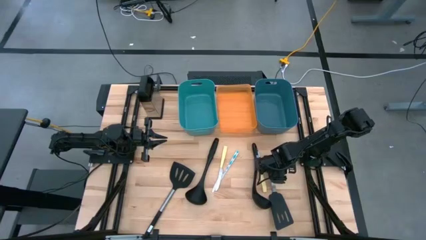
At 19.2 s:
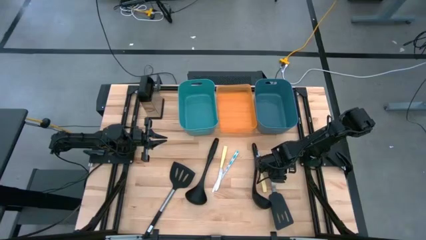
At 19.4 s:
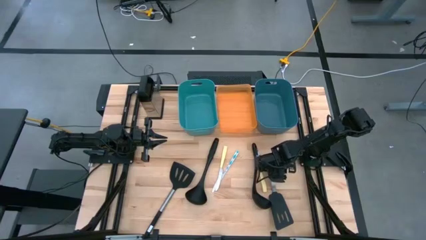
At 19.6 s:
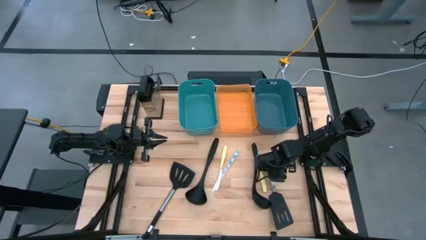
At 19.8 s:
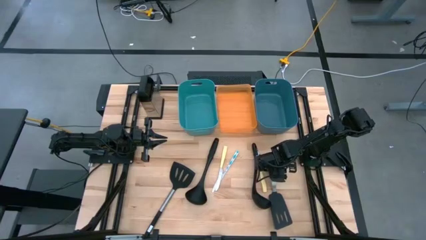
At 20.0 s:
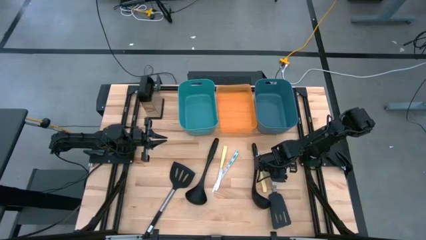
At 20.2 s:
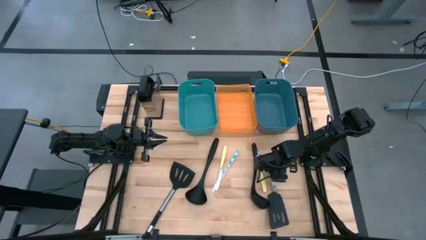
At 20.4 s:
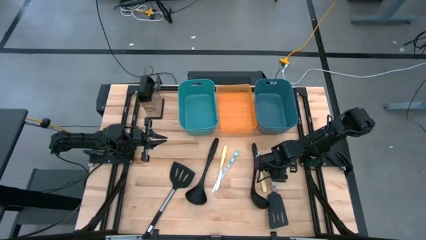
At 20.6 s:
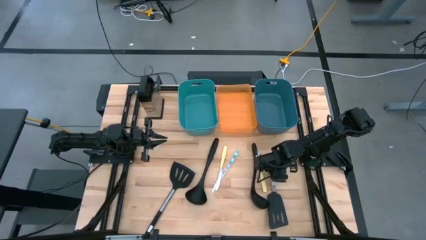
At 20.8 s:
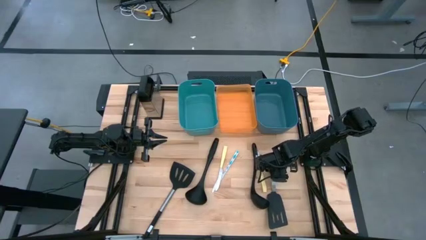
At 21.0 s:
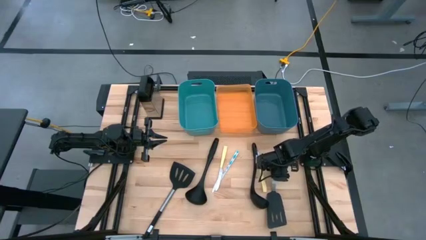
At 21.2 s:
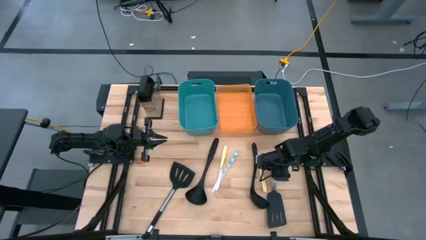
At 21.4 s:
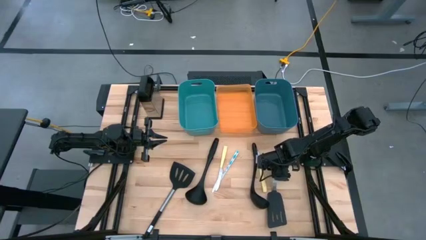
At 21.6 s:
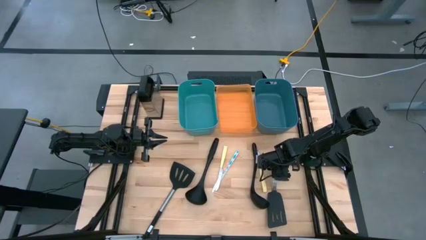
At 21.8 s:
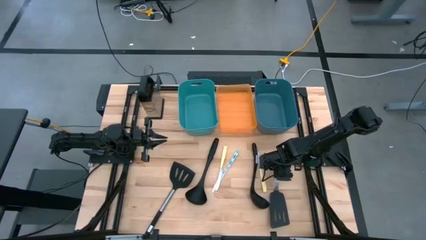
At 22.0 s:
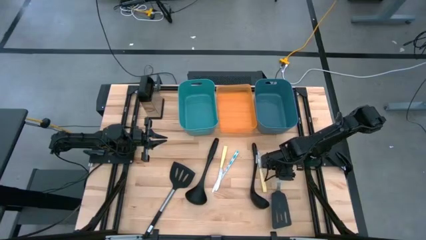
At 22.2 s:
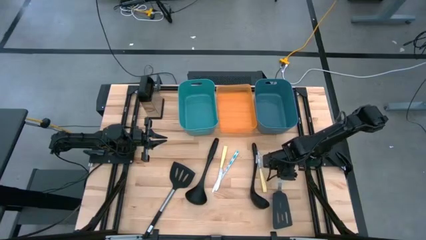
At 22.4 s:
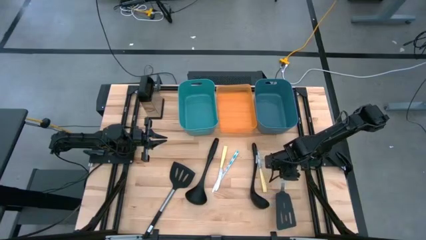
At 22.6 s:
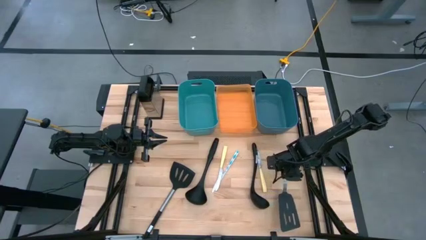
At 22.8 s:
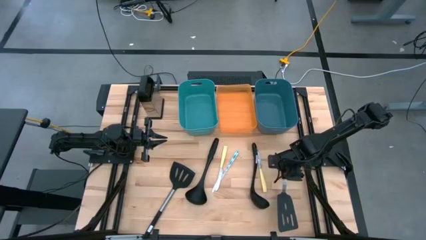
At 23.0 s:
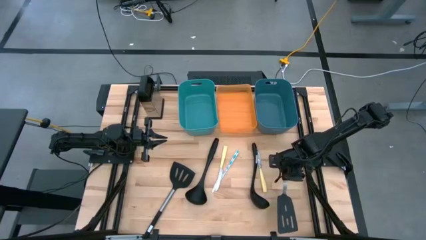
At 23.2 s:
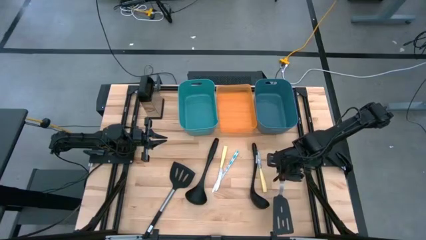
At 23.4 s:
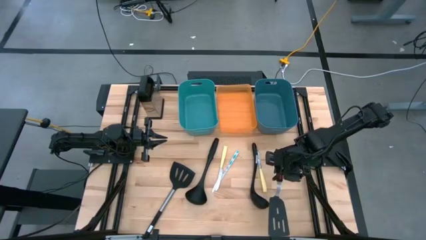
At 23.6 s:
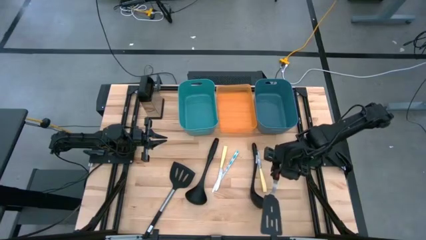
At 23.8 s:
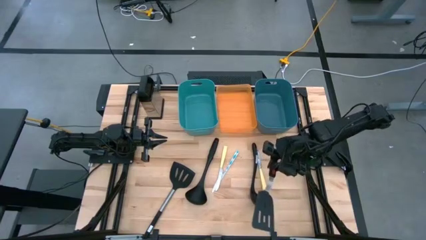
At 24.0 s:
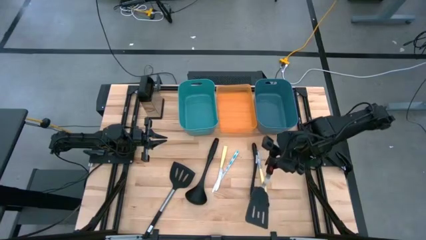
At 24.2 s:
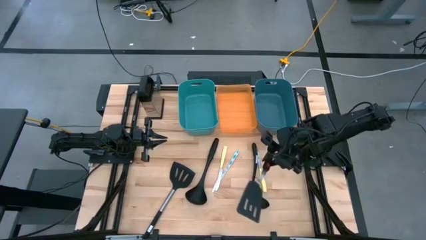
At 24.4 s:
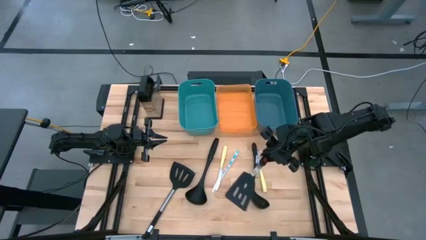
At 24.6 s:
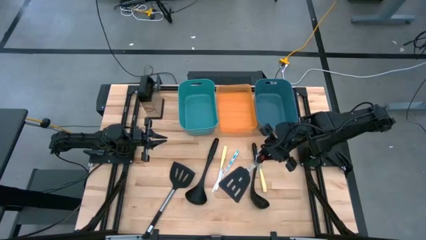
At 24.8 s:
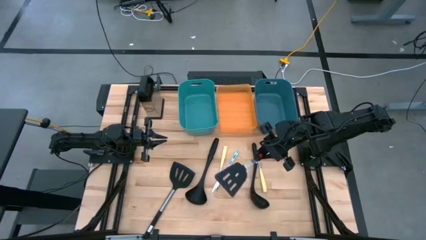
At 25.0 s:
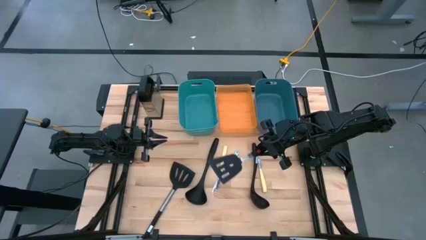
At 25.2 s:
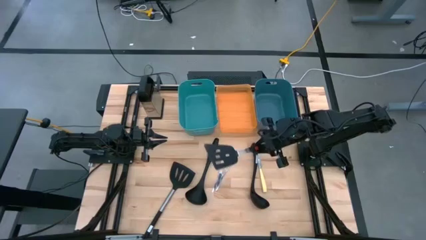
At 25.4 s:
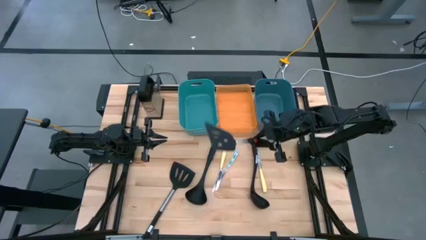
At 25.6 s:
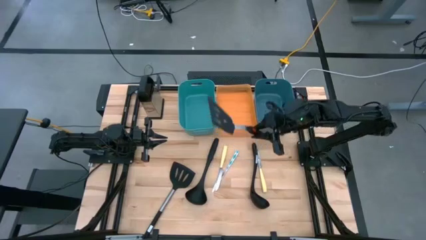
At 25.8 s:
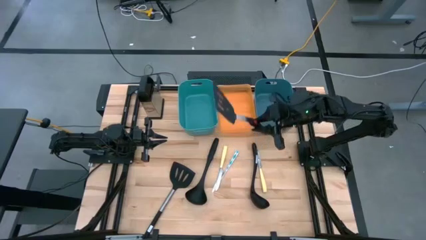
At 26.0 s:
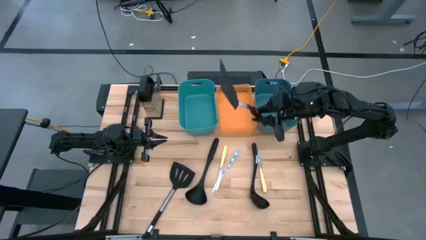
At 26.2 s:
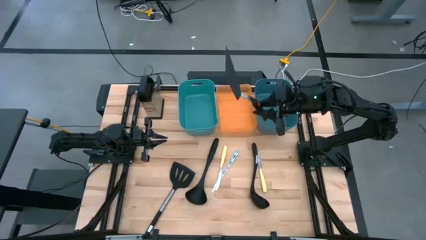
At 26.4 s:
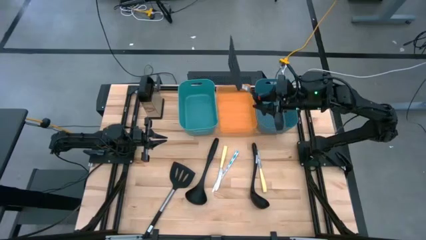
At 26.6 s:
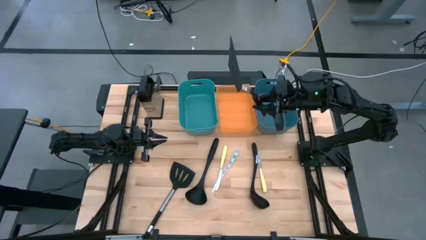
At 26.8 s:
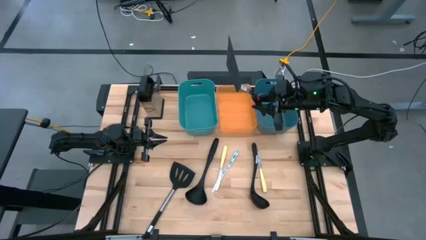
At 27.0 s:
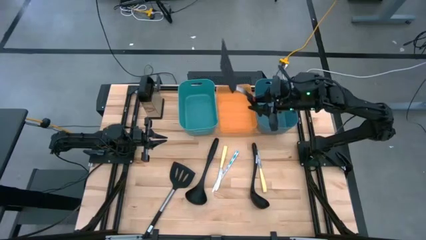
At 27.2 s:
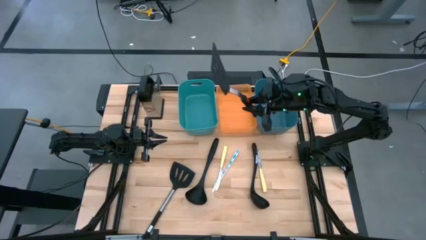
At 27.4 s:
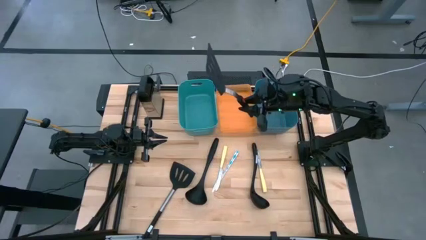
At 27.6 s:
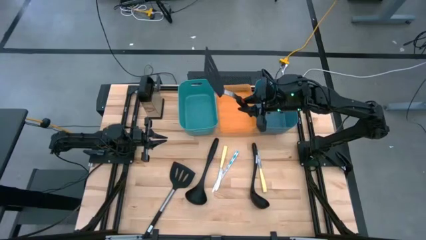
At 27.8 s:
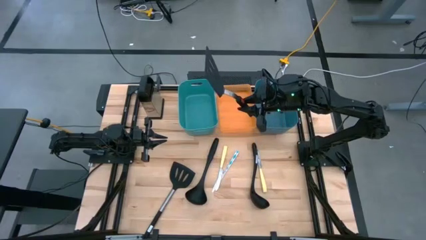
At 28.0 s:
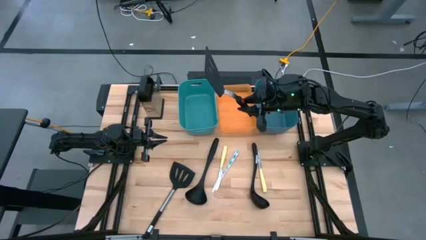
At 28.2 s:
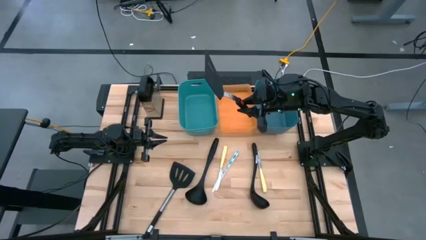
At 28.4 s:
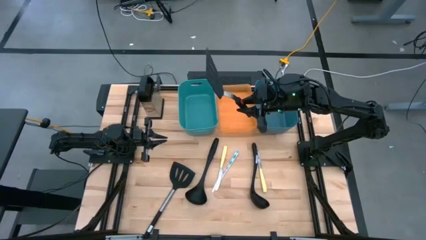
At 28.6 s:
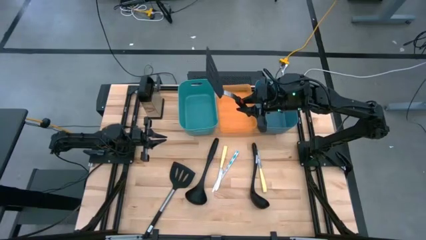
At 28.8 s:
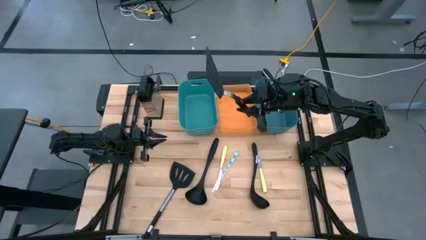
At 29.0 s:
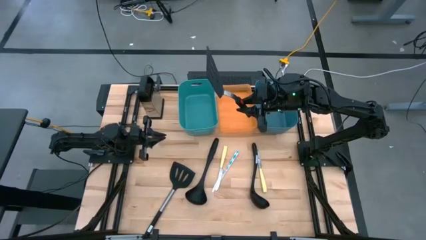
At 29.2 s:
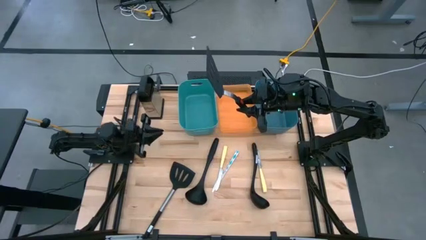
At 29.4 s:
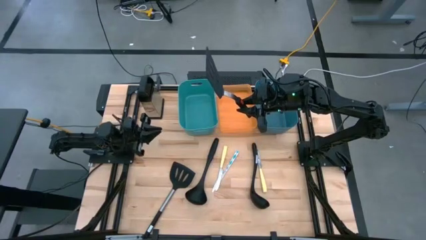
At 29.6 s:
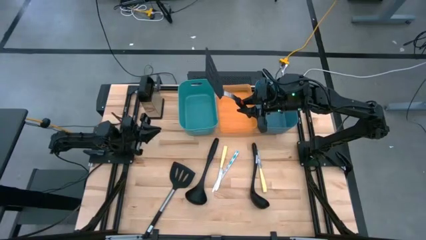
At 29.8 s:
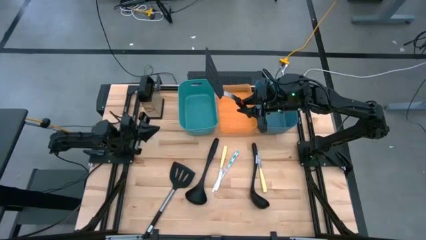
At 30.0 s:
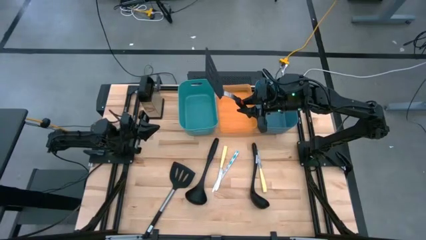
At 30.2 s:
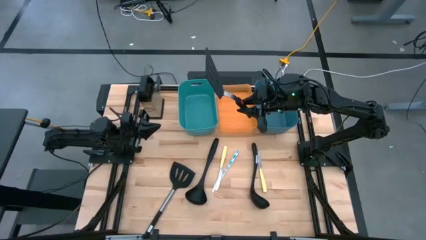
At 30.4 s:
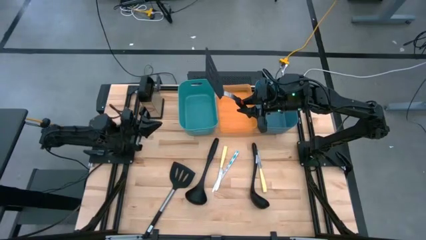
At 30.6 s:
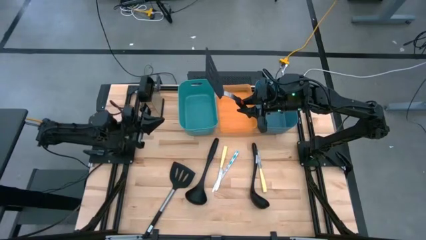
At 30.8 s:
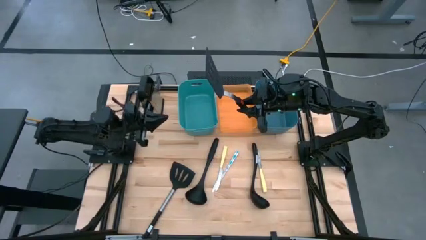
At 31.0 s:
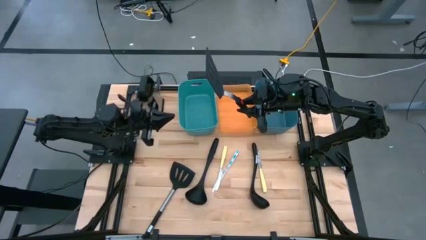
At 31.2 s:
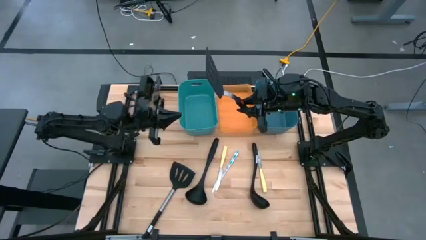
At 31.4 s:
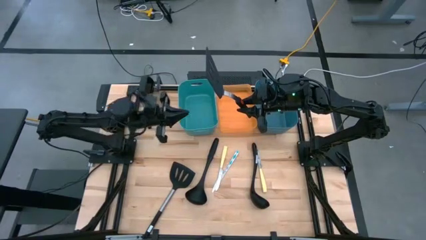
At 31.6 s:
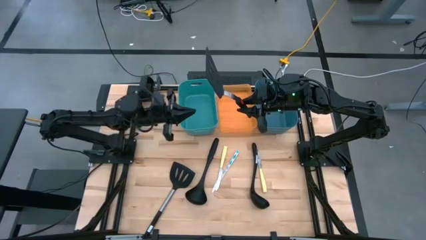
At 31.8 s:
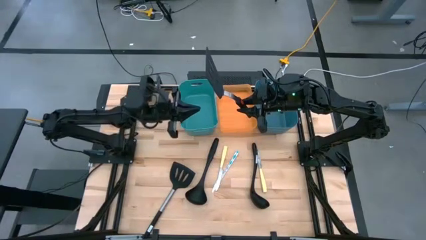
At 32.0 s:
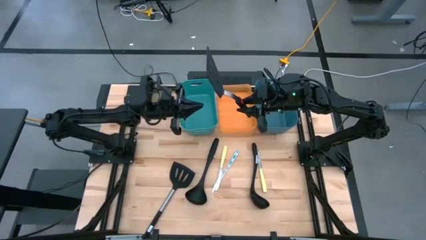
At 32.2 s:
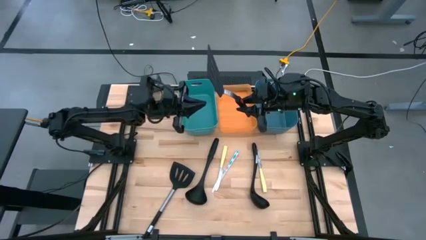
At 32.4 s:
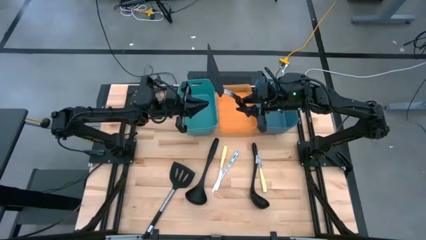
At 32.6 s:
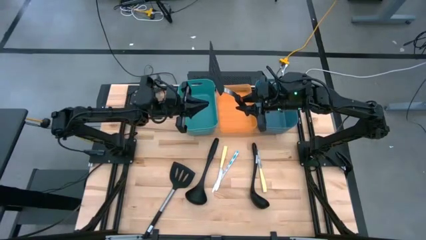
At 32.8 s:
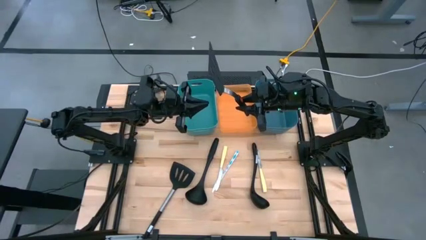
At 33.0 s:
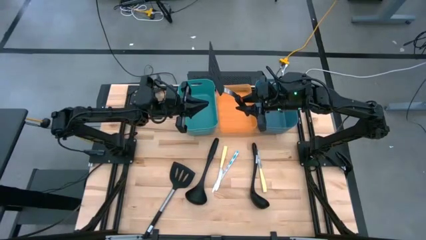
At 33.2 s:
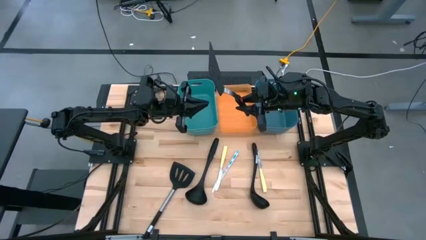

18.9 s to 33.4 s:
Task: Pick & Place Kitchen Items
Put the right black spatula into the green bin
